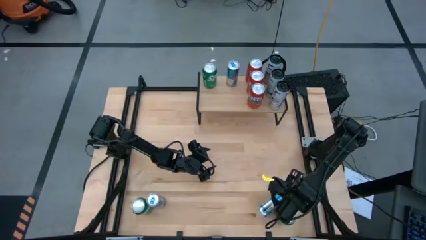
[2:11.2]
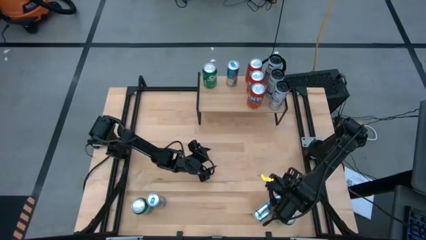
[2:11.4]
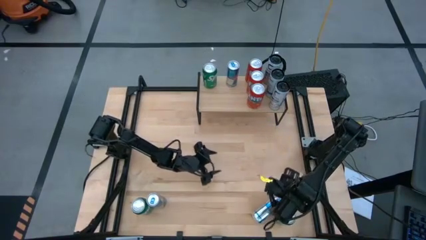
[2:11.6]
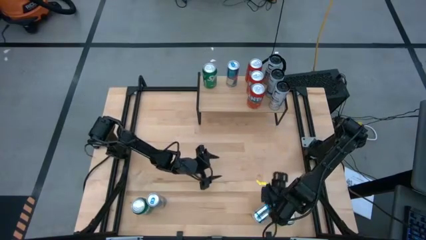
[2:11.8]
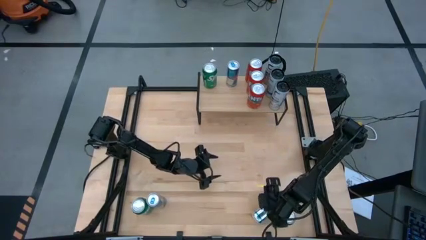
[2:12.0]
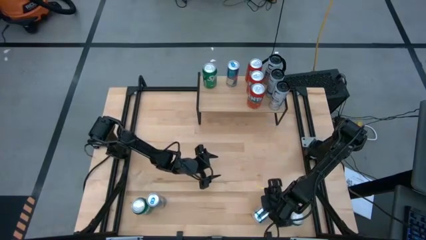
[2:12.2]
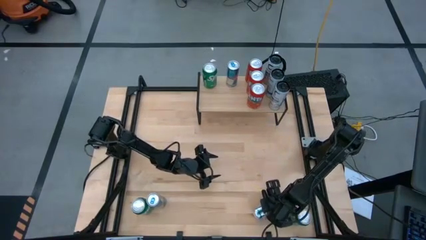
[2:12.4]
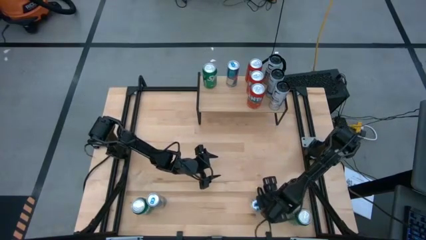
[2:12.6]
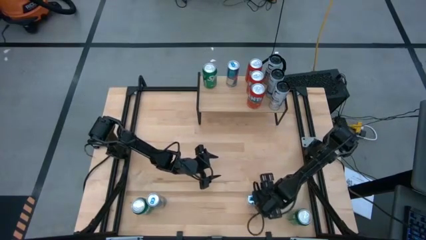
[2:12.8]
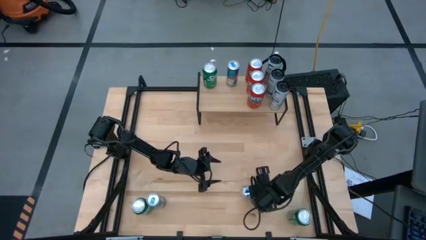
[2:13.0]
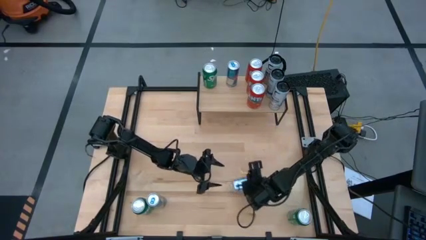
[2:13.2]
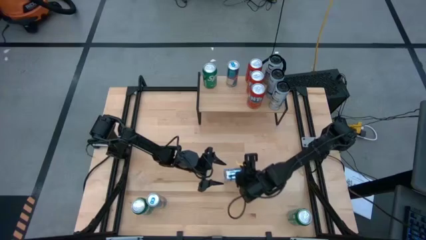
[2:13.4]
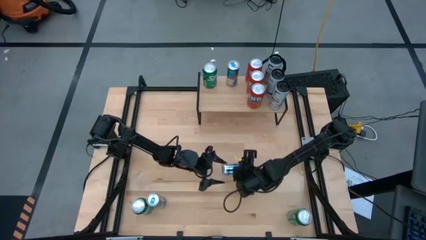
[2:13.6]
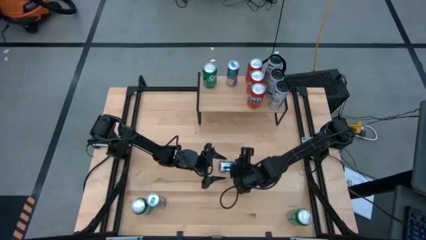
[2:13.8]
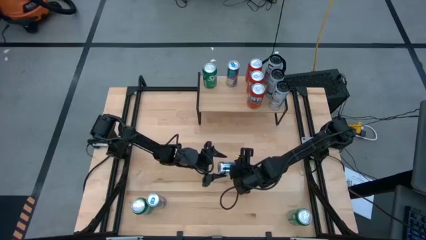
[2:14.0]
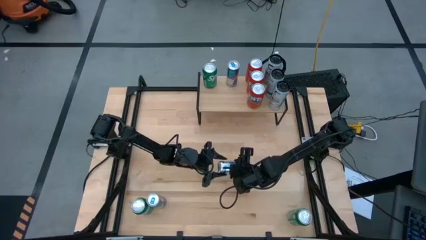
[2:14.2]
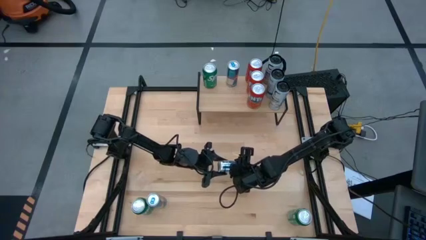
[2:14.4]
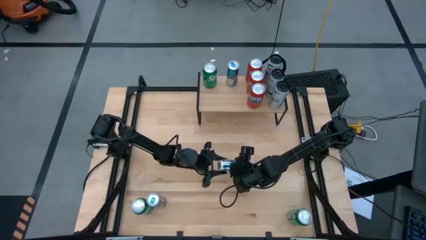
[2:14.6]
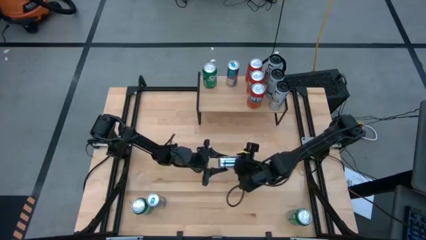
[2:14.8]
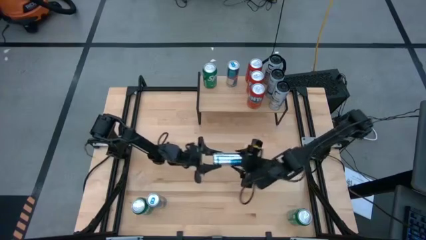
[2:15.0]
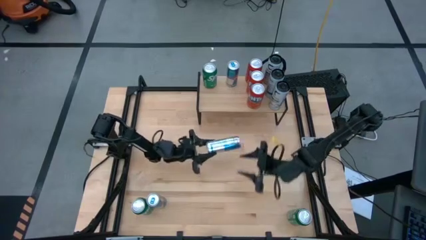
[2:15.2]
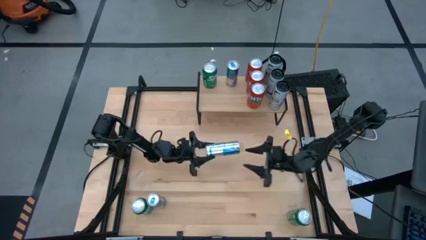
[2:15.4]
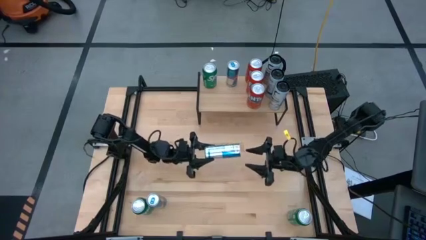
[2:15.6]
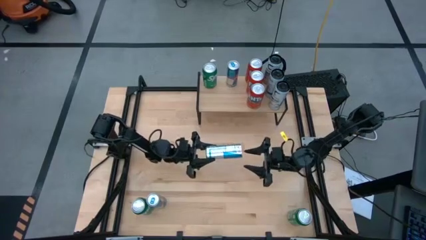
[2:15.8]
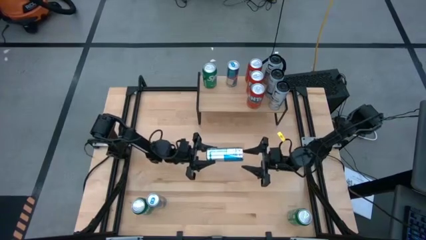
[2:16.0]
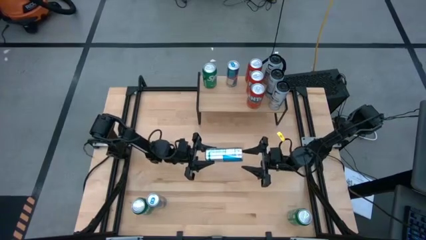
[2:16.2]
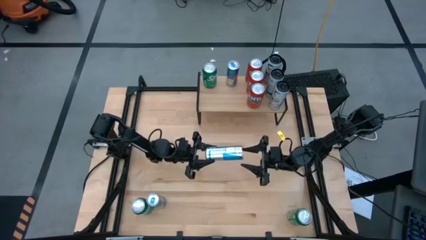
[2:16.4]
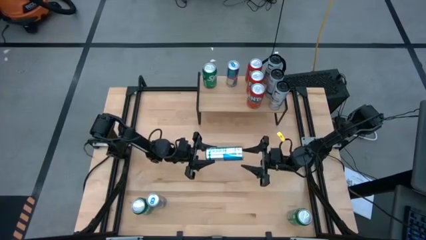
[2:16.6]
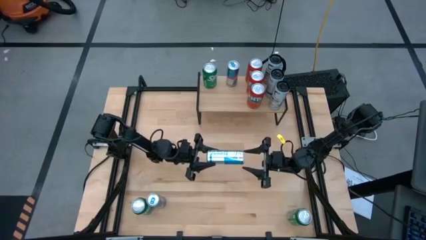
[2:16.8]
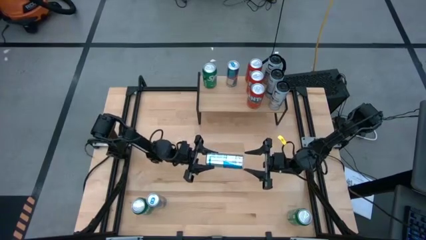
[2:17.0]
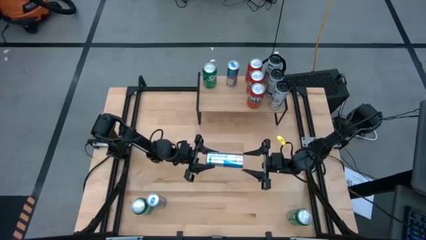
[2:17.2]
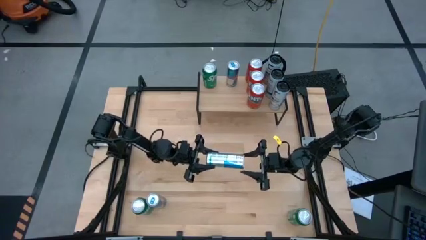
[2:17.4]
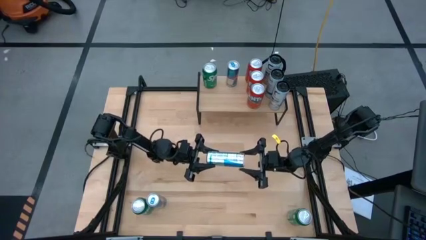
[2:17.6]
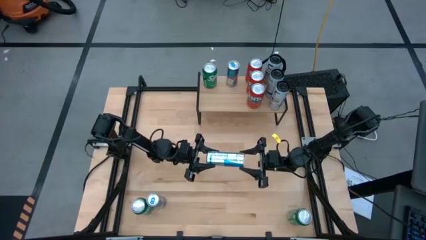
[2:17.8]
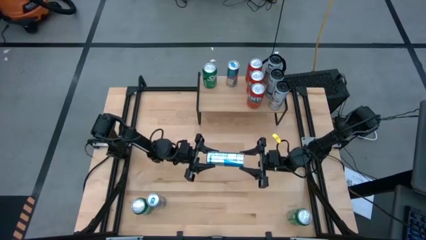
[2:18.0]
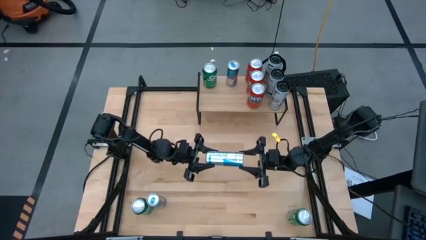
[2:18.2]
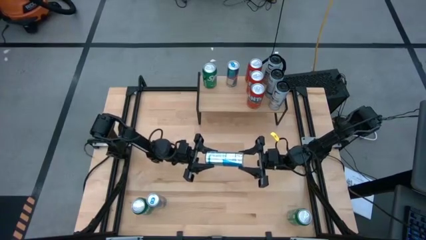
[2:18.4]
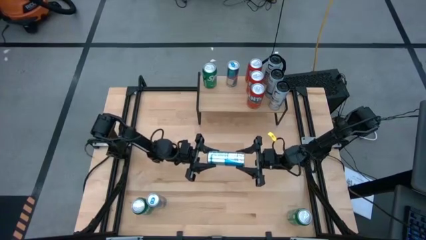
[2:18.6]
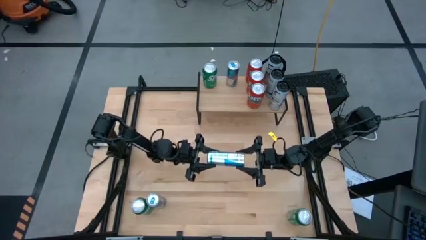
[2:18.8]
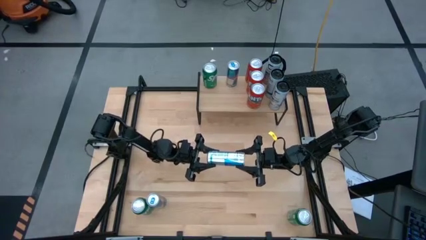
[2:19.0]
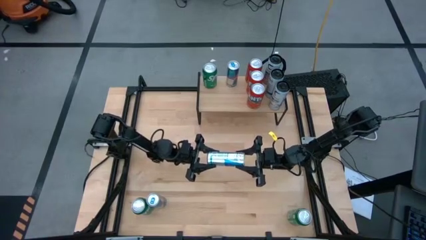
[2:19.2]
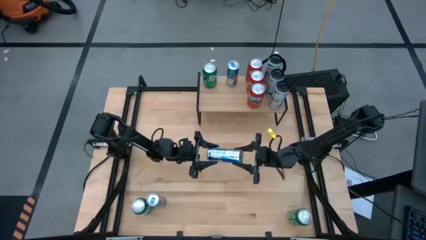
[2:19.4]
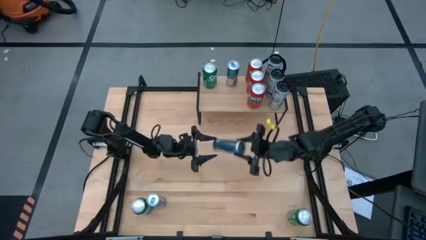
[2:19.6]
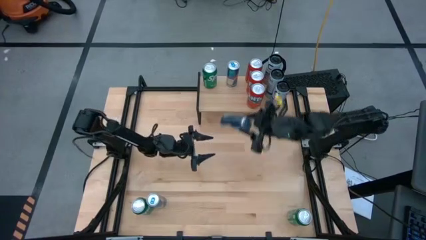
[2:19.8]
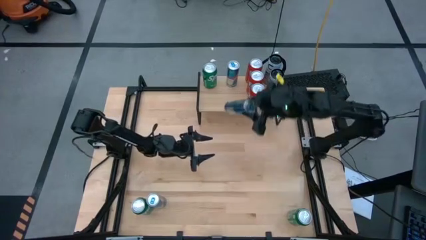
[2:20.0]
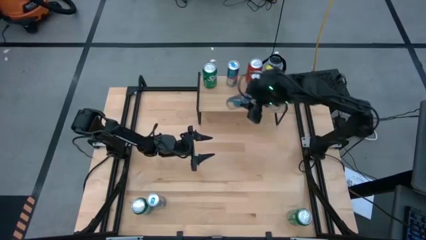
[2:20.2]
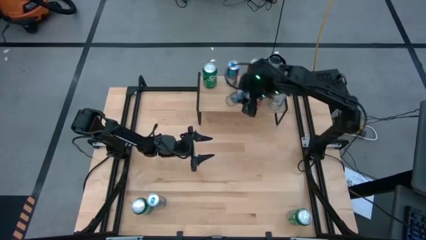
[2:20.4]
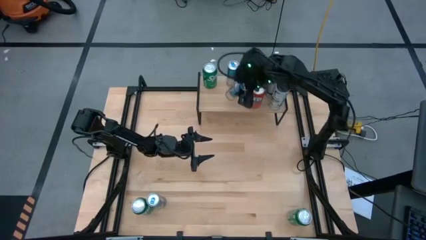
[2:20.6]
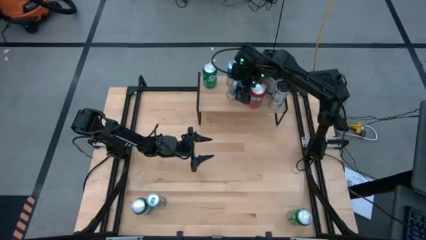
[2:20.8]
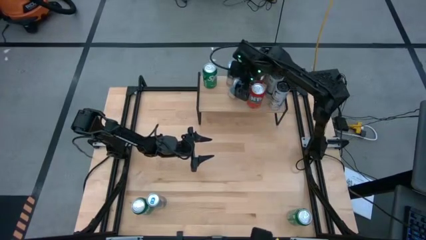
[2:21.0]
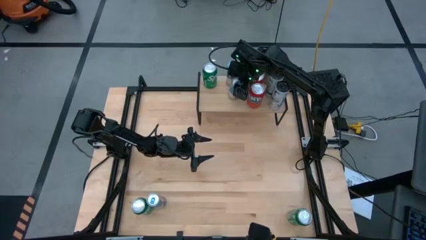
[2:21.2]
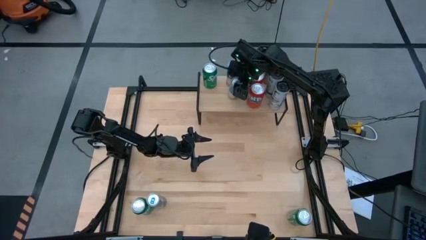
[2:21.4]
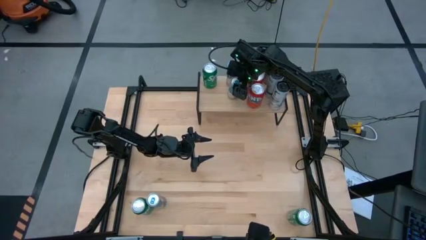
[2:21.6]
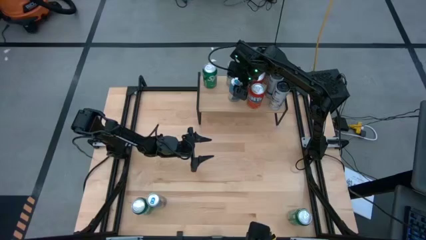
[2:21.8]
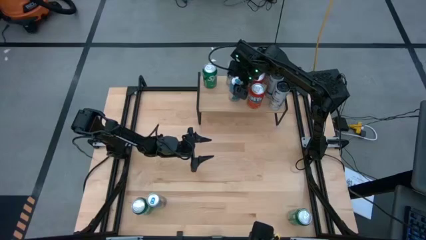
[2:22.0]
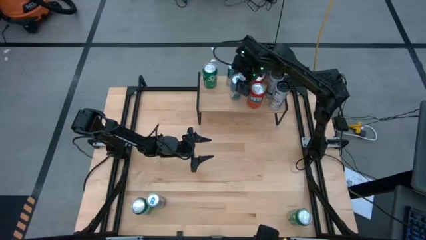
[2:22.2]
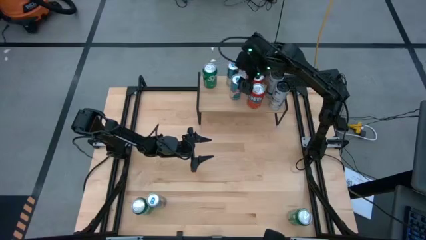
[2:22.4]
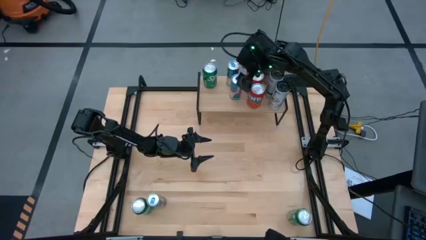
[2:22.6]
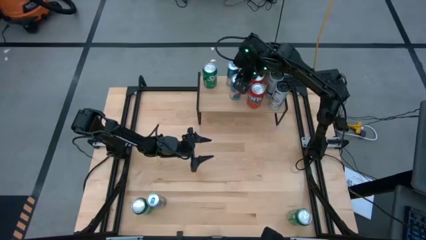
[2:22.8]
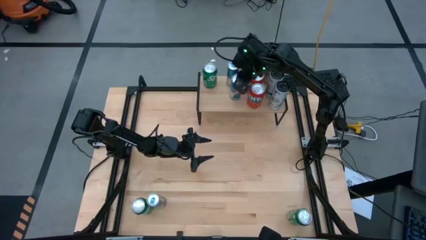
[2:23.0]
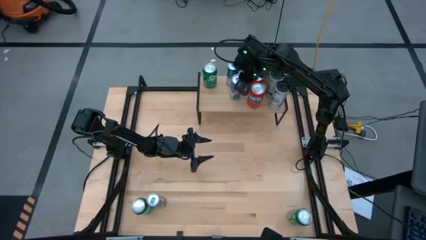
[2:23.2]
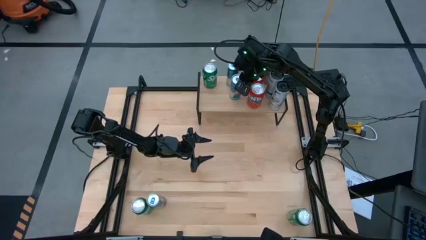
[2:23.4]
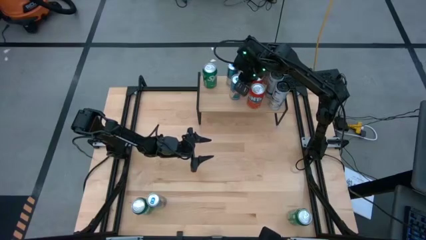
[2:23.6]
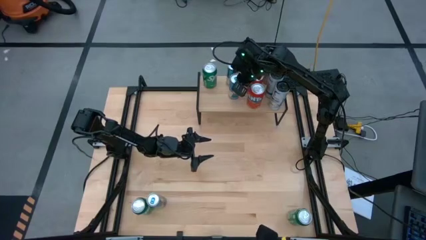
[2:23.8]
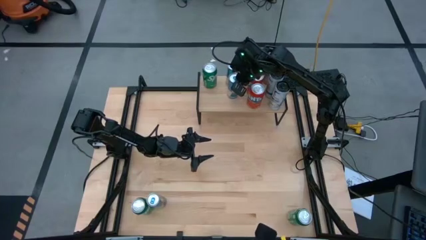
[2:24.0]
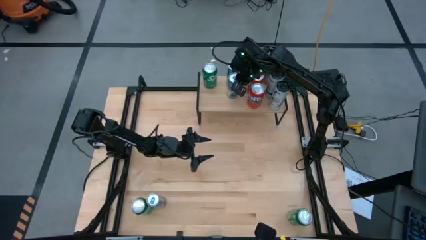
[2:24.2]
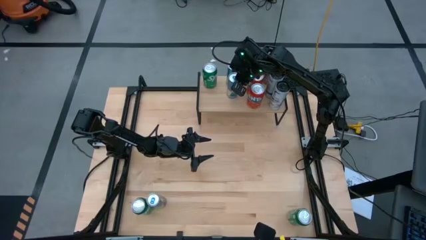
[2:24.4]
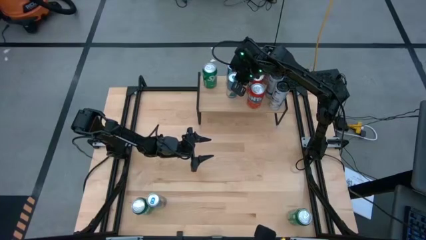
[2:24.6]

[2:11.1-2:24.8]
Task: Place canned beverage on shelf
Put the right blue soda can on the shelf aligned with the other blue soda can

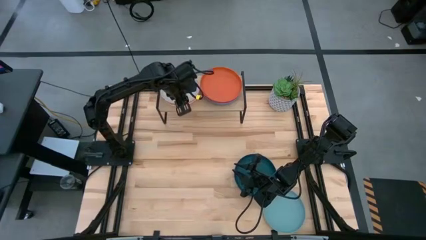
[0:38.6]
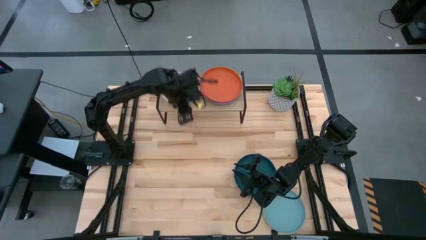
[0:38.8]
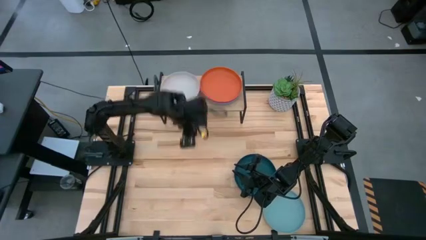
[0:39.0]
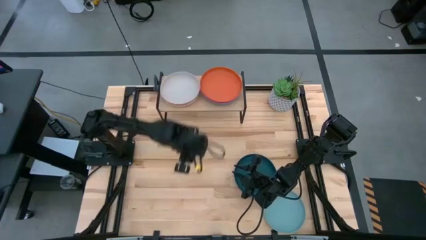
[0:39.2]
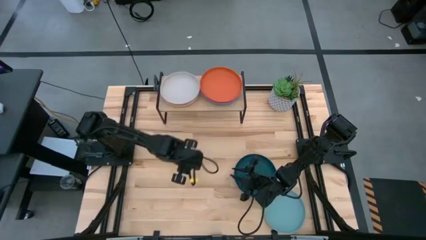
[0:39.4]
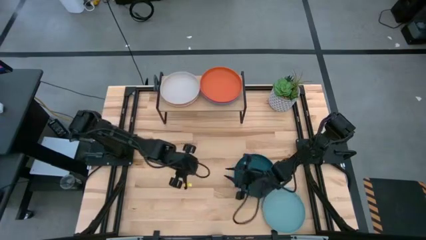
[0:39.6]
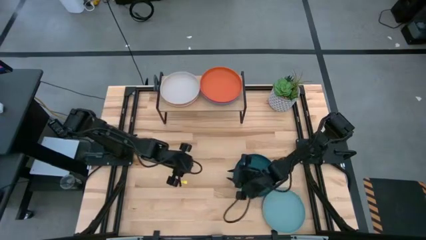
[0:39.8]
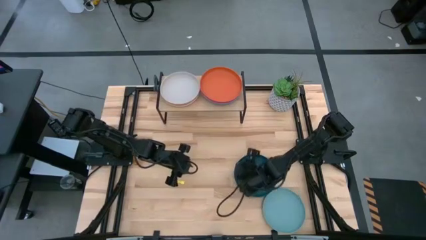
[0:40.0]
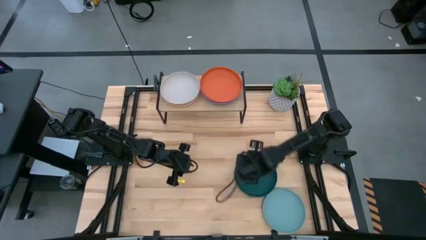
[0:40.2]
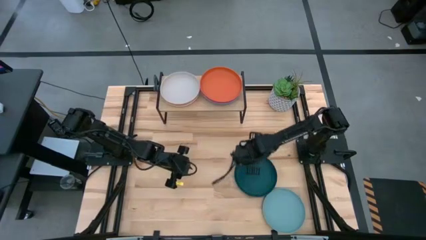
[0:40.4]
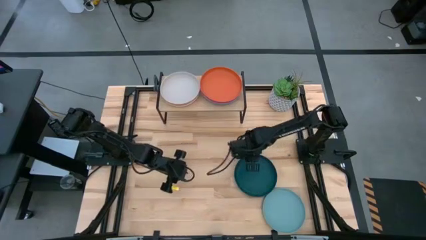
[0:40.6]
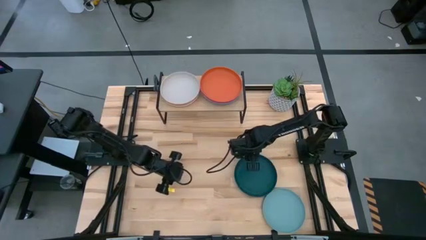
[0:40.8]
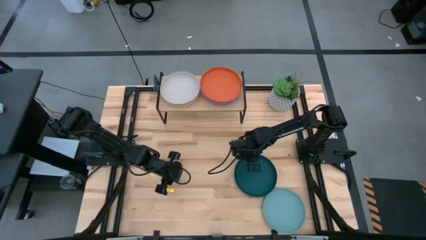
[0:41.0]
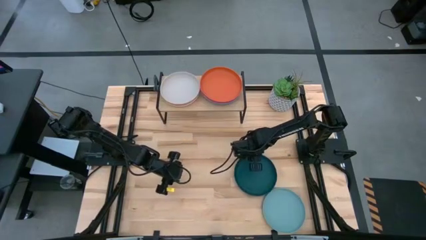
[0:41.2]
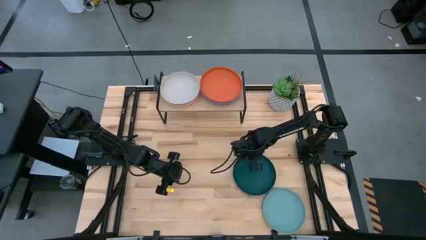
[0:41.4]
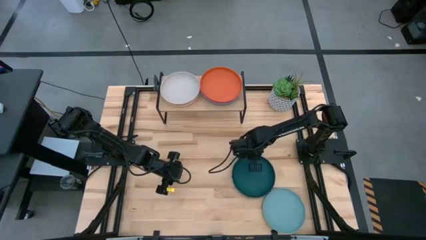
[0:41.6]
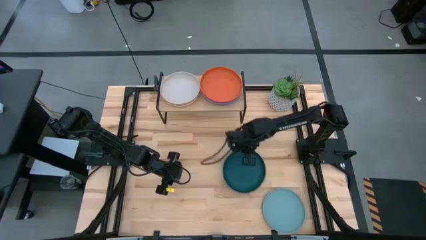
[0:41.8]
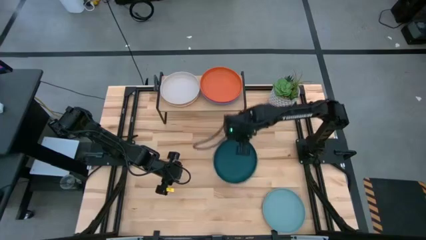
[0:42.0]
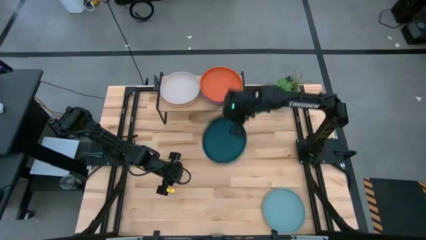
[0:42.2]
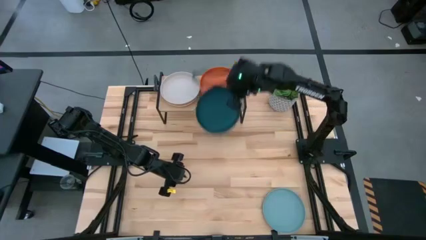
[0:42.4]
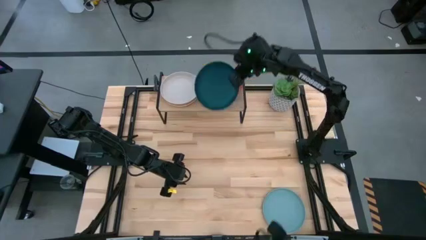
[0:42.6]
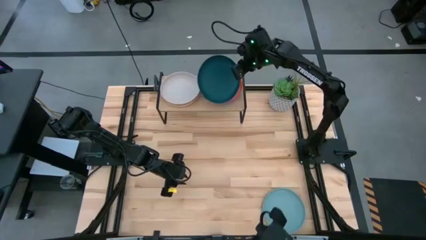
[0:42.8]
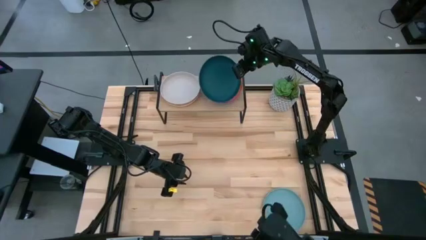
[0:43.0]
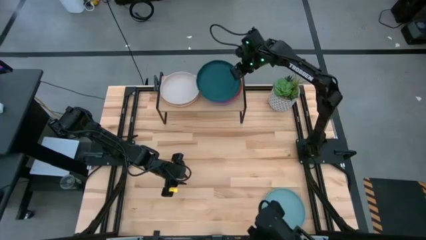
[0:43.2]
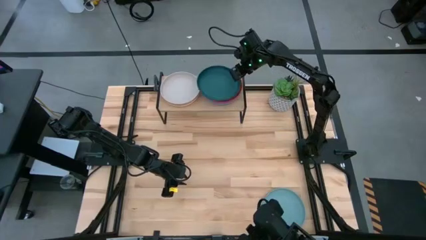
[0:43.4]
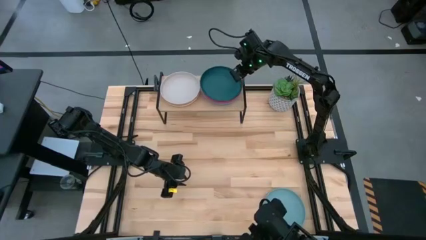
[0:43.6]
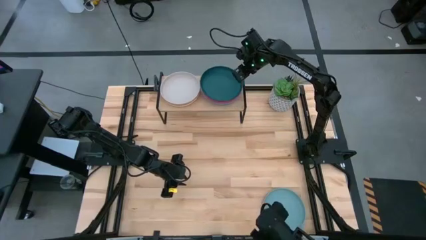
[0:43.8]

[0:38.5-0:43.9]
Task: Place and stack plates onto a shelf
Stack the blue plate on top of the orange plate on the shelf
